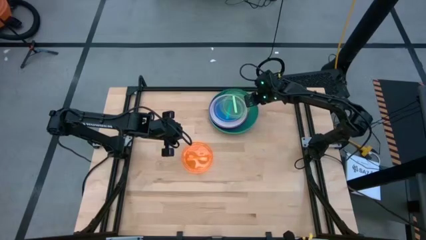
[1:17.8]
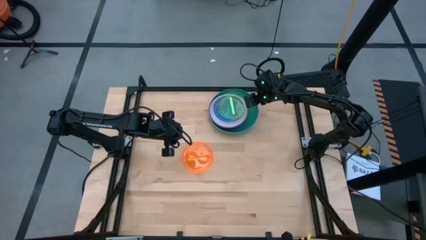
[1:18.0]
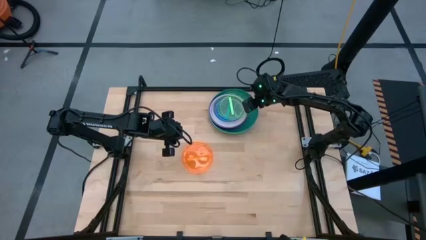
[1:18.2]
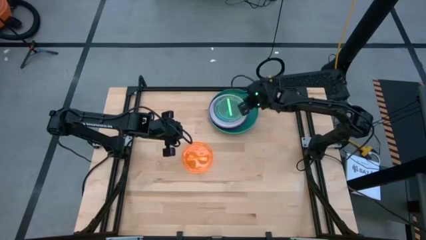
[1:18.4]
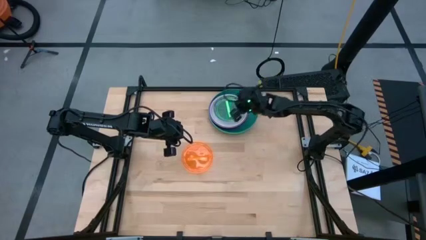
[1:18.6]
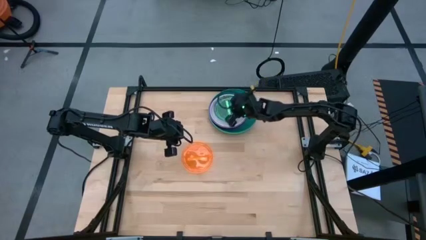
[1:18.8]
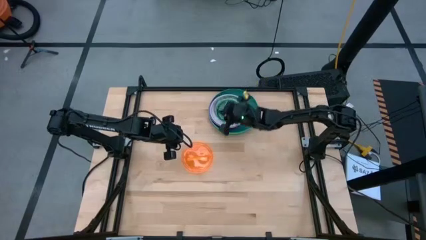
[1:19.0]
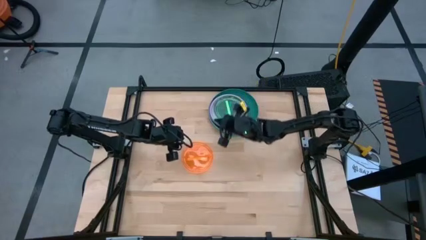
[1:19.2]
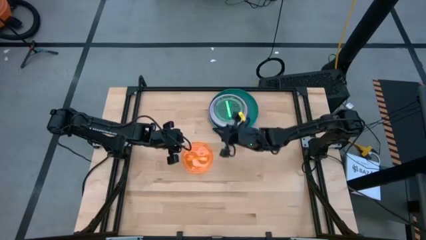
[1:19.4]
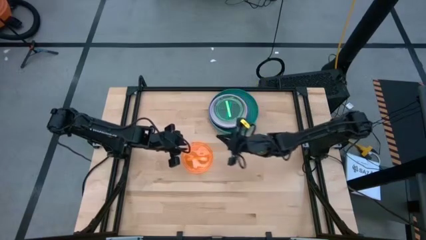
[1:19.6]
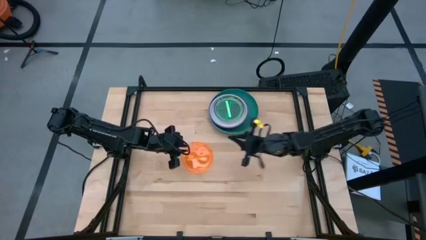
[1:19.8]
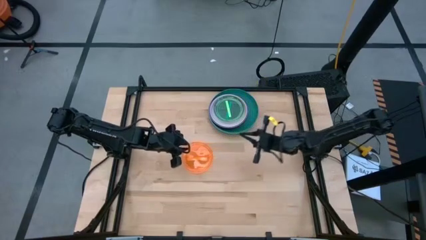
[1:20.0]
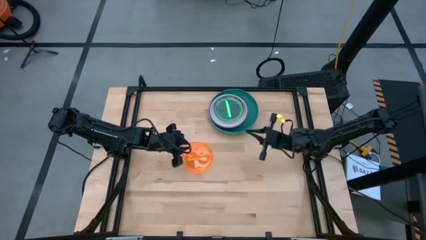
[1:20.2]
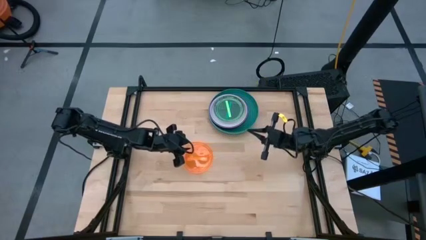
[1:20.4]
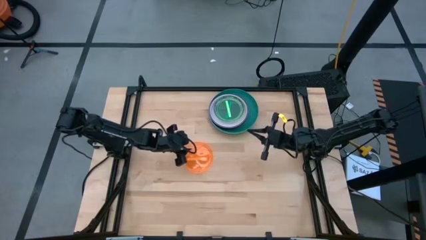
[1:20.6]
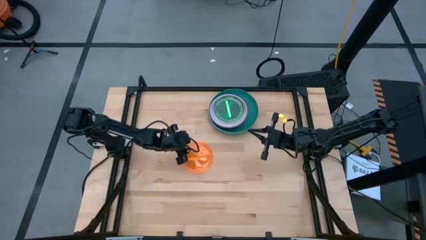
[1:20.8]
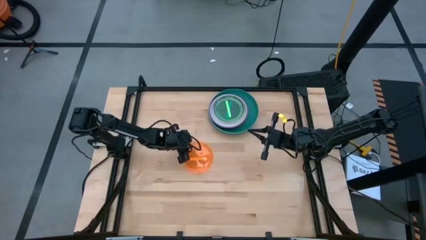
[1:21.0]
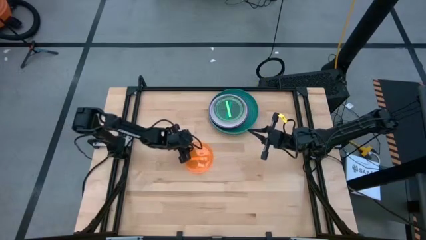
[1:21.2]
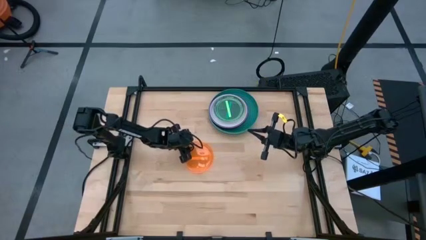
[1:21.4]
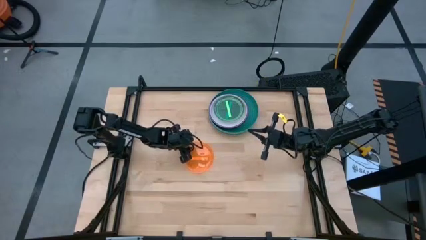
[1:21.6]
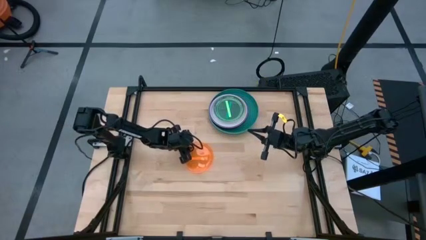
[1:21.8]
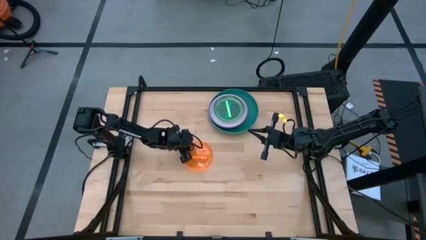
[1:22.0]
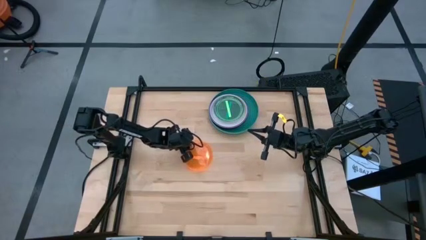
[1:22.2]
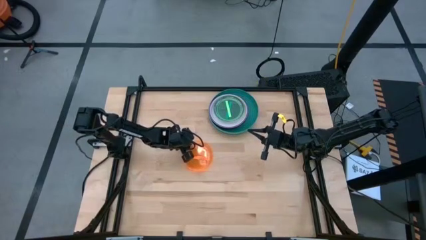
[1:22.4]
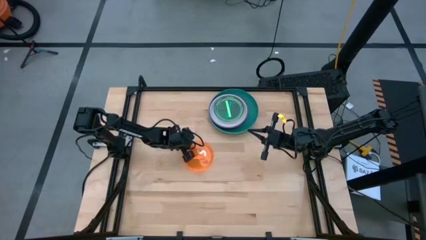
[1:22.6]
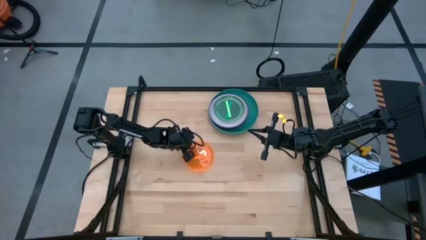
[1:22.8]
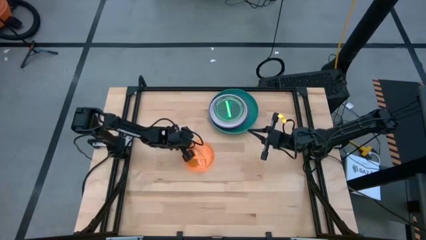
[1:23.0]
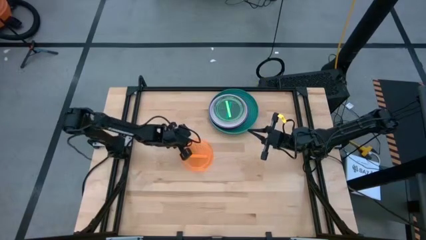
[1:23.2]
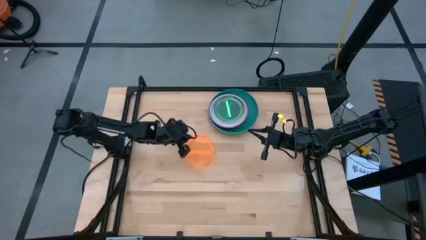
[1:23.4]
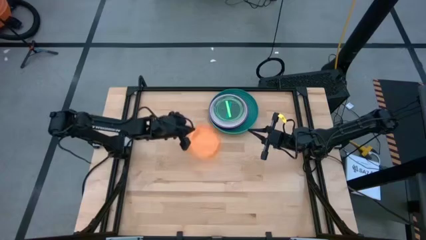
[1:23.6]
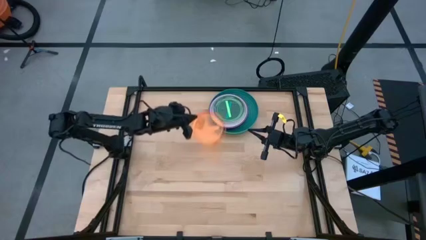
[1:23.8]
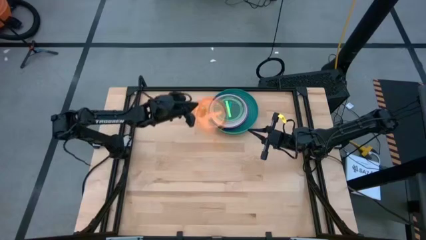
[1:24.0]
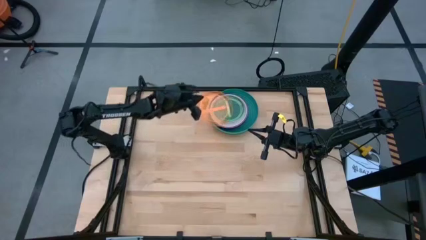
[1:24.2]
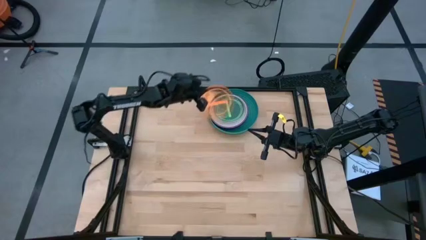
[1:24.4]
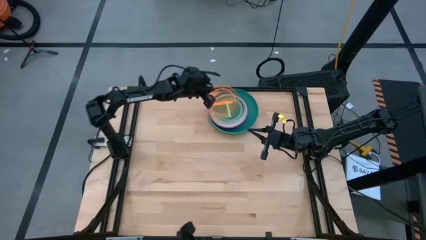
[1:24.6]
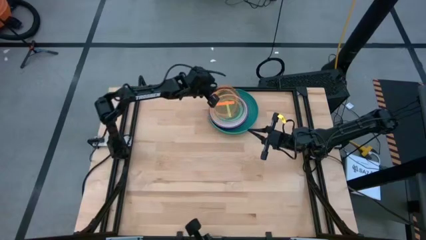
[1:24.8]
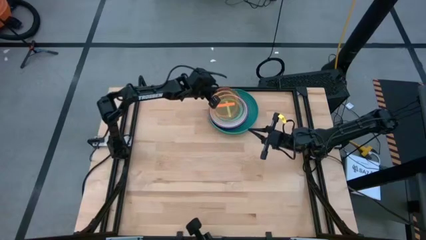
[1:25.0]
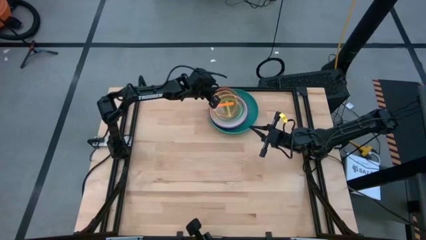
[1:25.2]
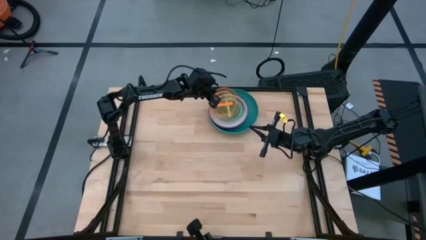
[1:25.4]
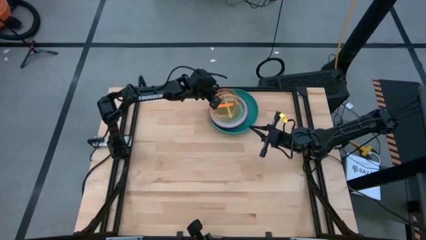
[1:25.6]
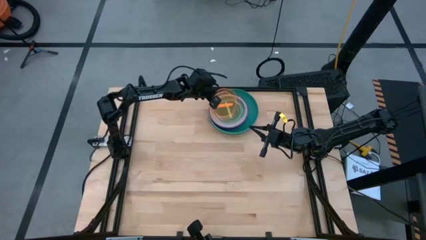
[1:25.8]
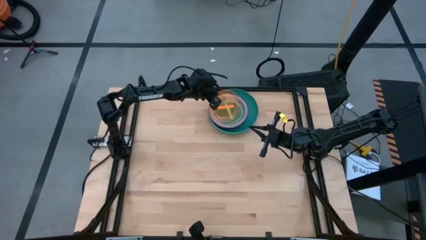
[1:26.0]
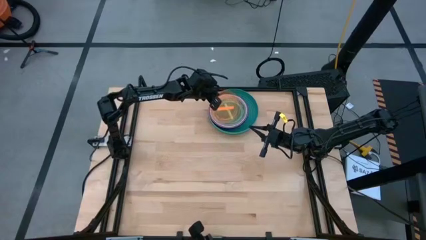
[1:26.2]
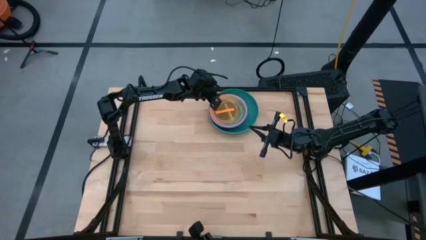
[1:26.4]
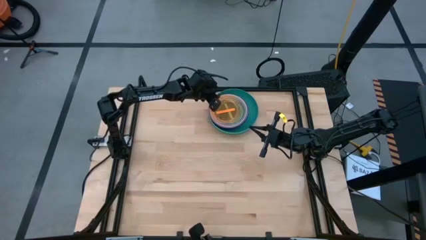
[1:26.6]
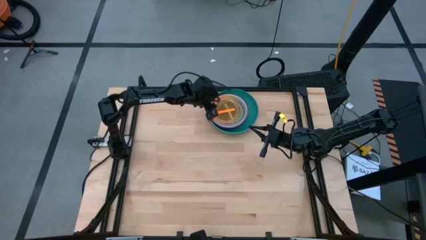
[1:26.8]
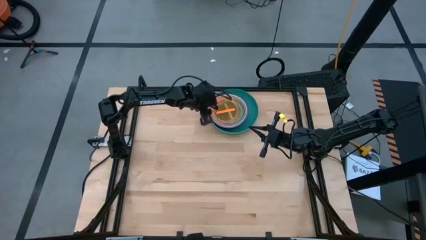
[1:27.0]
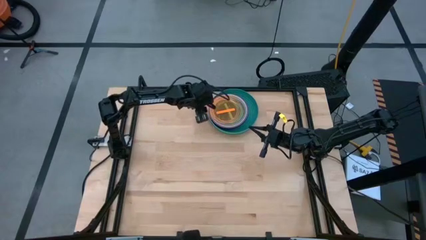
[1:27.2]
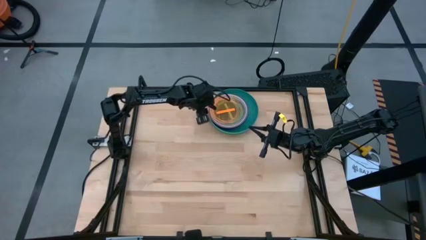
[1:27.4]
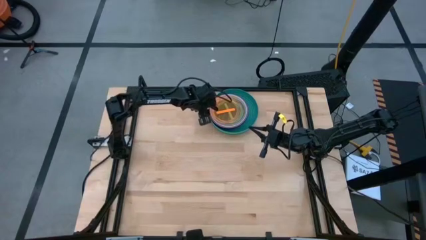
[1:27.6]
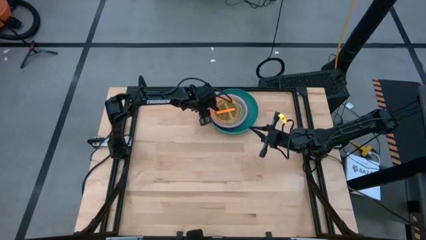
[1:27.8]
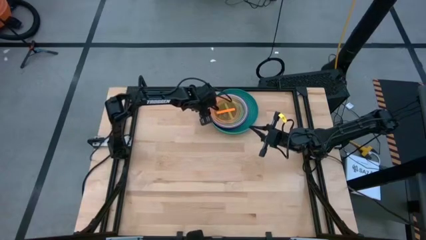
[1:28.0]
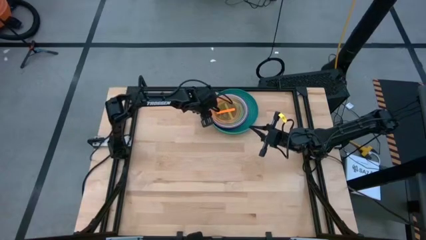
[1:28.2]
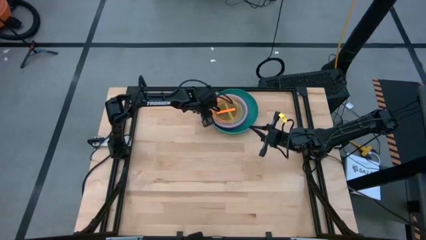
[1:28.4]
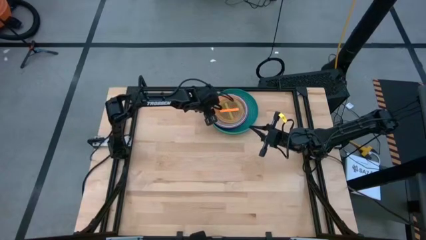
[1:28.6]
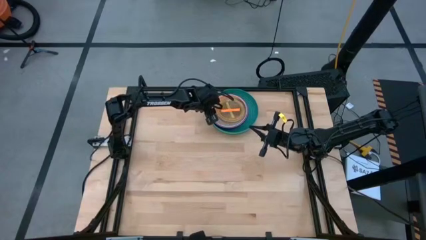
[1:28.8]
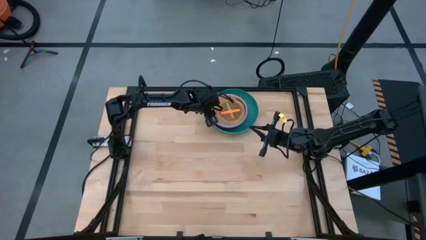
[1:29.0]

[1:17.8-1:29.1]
Task: Stack plastic plates
Stack the small orange plate on top of the small green plate

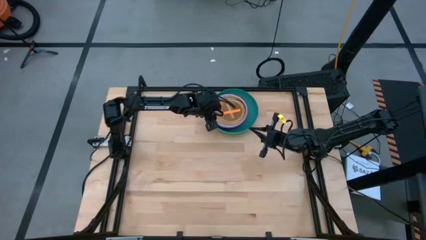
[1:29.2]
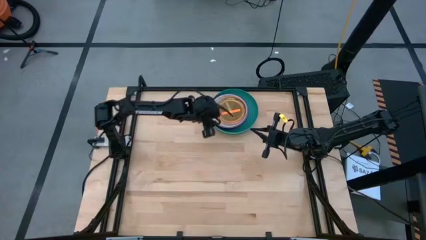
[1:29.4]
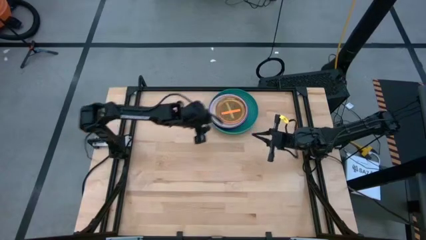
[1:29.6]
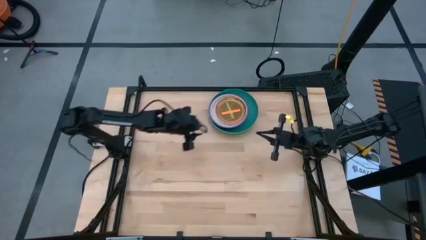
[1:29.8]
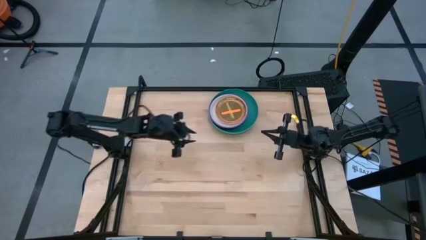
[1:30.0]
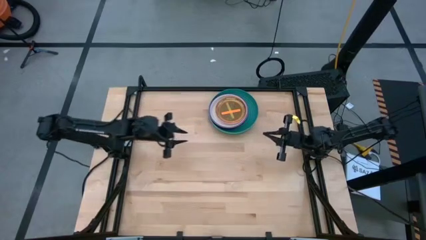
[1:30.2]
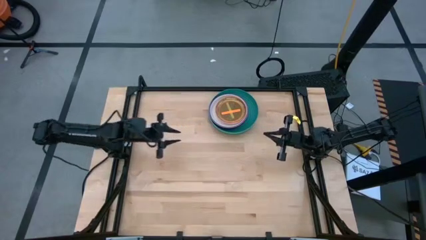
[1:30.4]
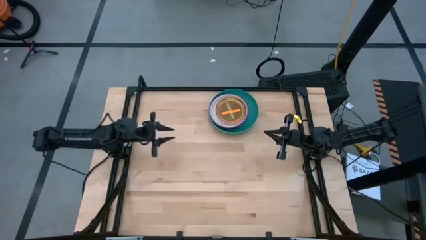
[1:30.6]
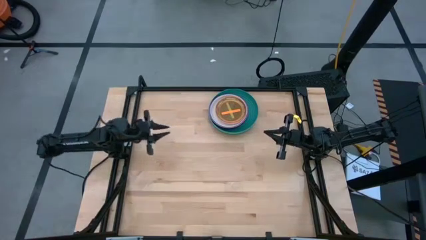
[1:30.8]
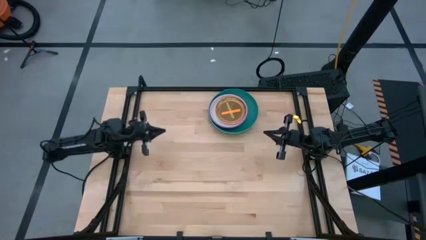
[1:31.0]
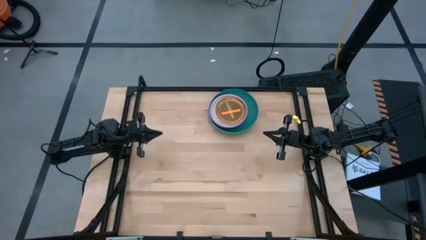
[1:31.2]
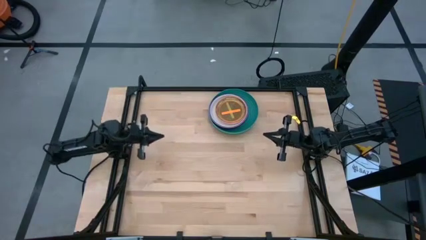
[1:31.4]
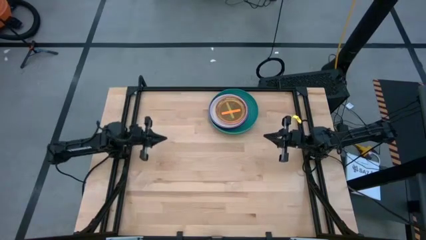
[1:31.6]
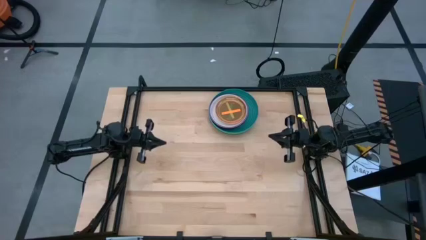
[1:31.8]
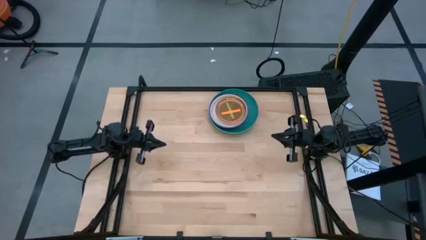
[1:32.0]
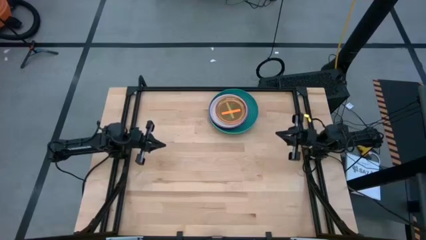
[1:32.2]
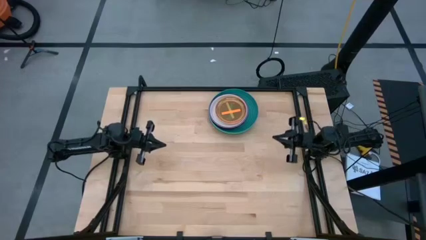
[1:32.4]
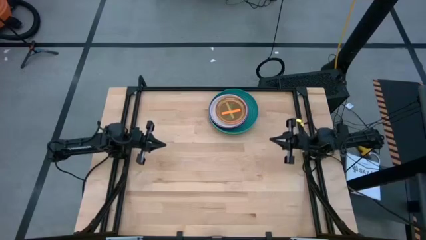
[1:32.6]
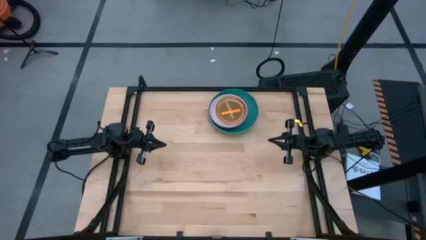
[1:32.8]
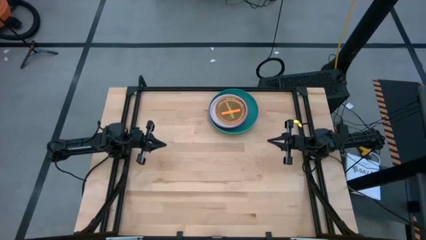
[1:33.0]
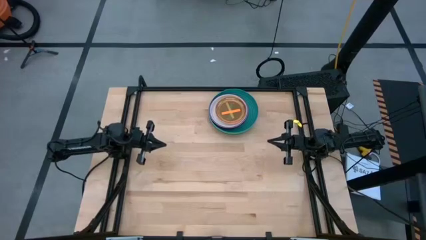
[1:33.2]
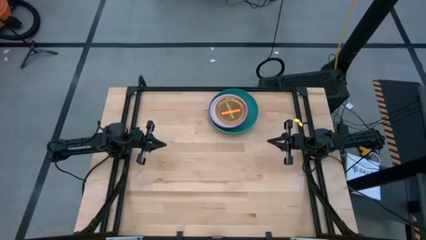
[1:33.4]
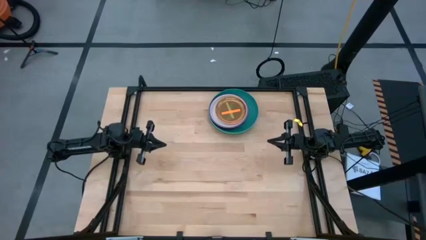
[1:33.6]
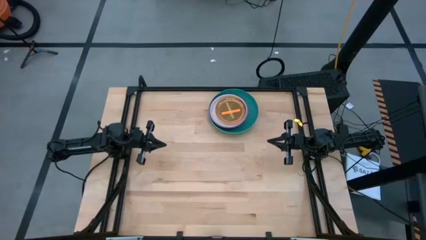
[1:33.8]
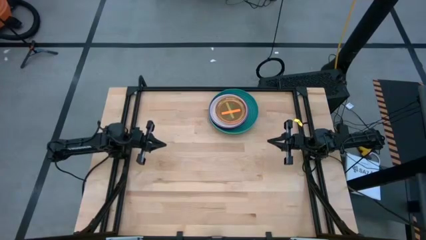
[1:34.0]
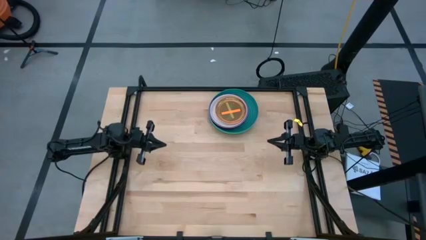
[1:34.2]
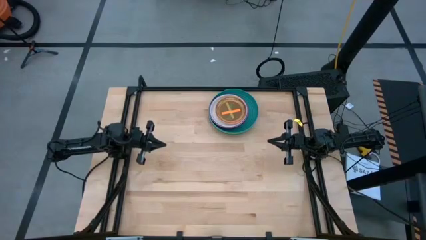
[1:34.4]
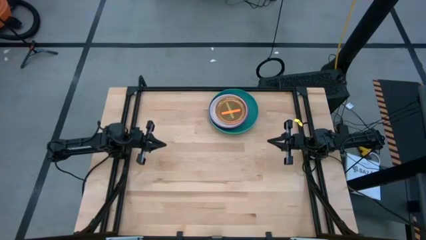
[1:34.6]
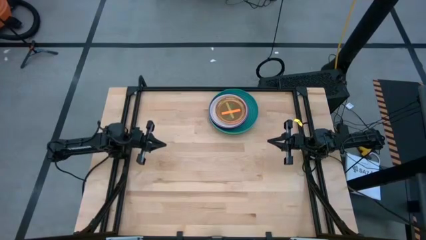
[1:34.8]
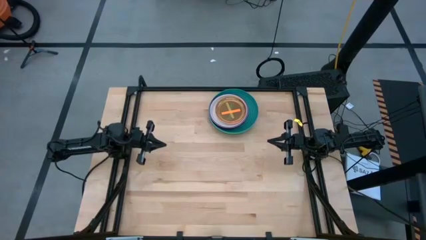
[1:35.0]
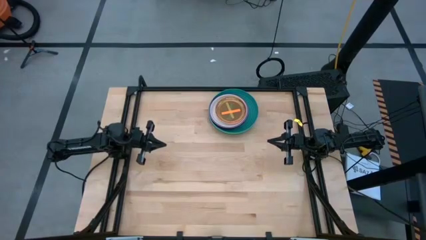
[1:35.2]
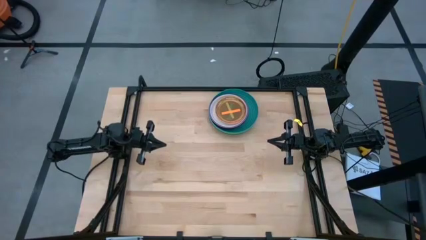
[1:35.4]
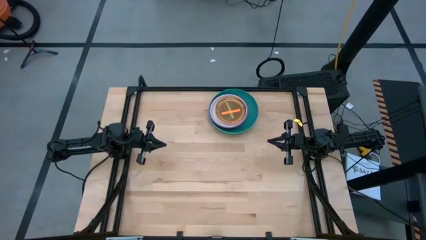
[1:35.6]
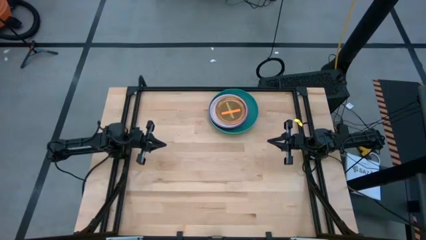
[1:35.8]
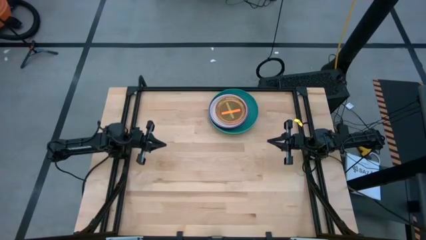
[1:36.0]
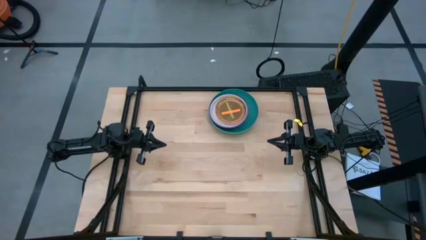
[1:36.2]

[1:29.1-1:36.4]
Return to Home Position
